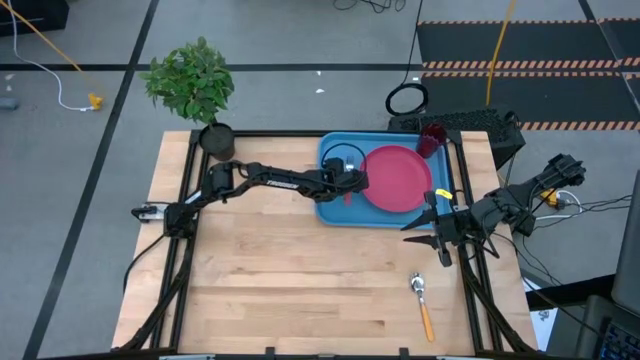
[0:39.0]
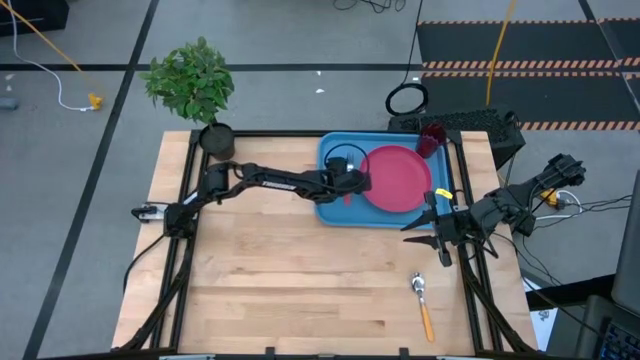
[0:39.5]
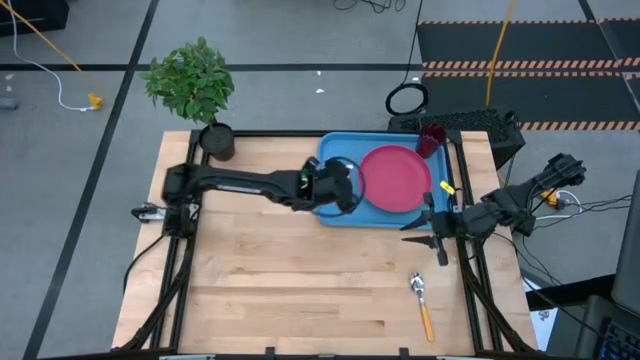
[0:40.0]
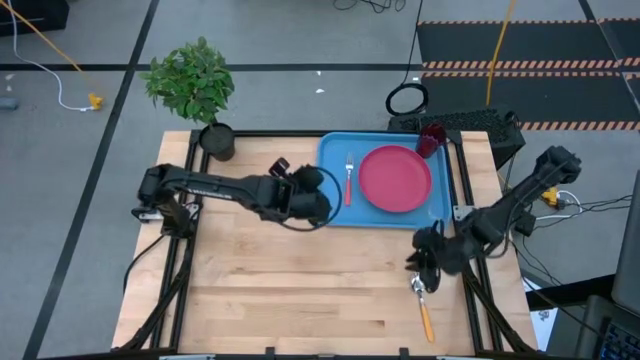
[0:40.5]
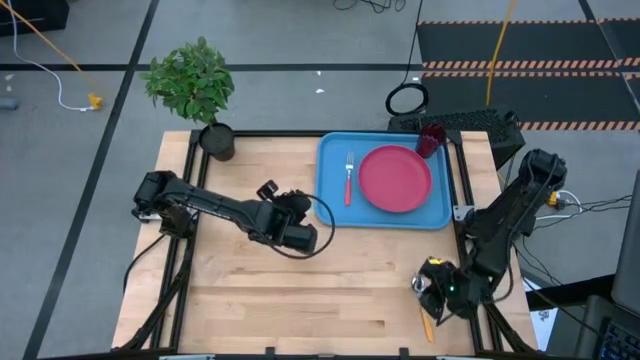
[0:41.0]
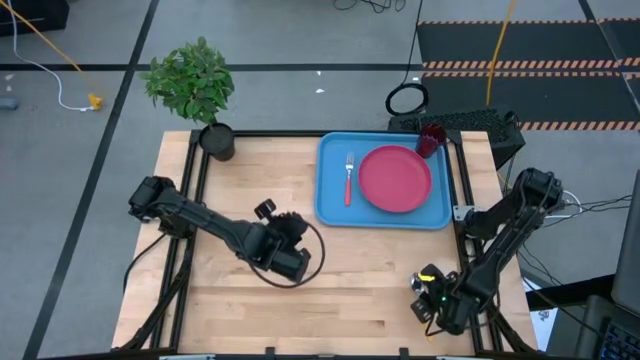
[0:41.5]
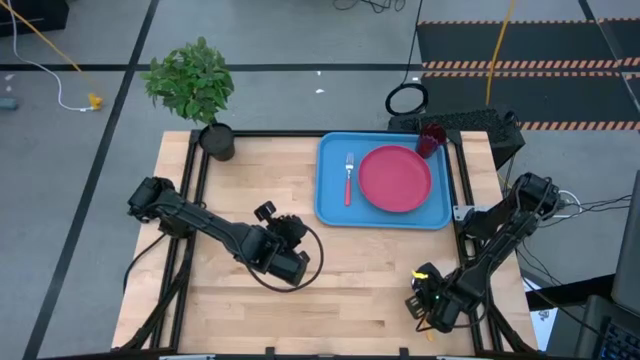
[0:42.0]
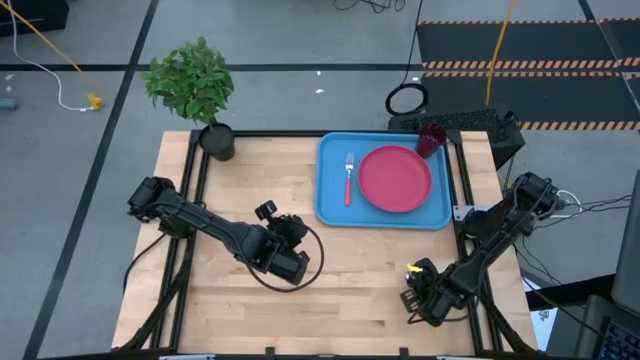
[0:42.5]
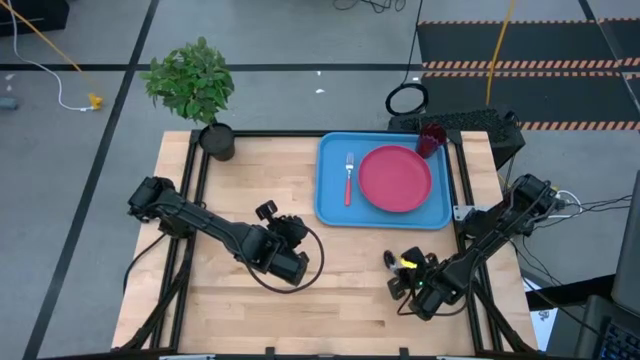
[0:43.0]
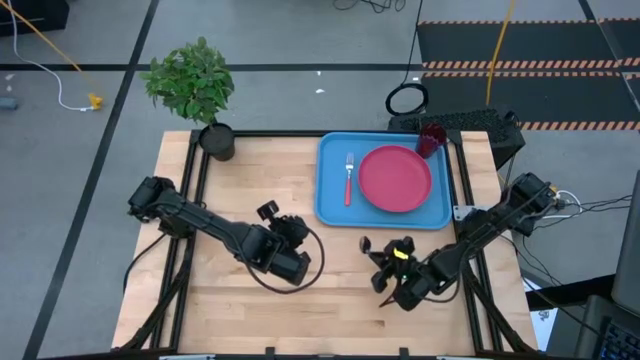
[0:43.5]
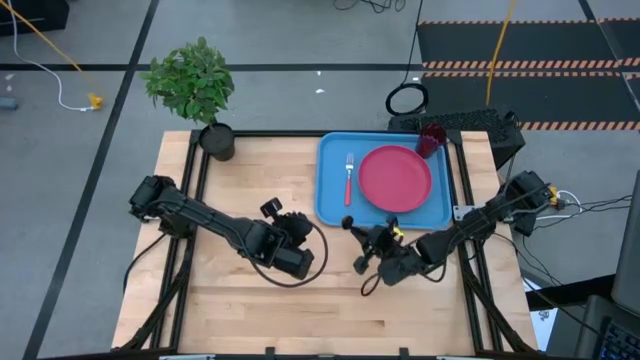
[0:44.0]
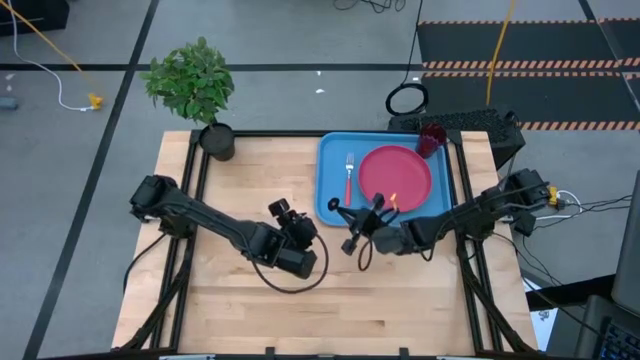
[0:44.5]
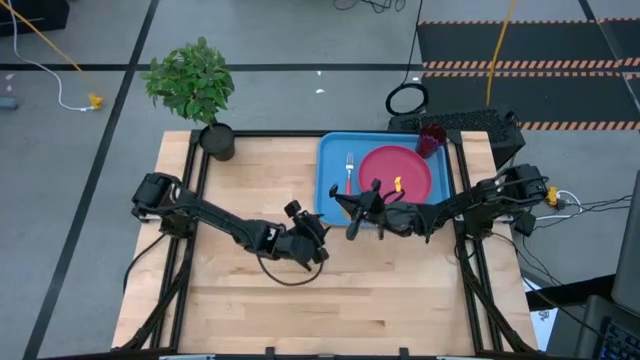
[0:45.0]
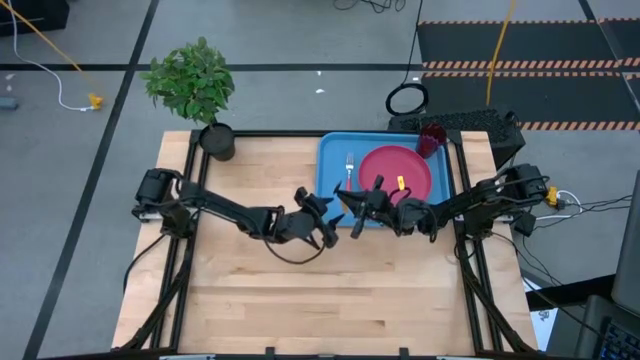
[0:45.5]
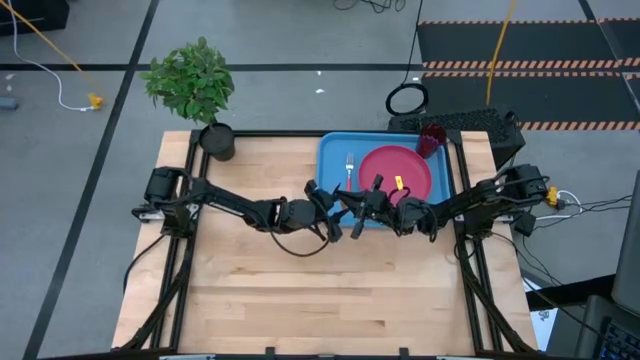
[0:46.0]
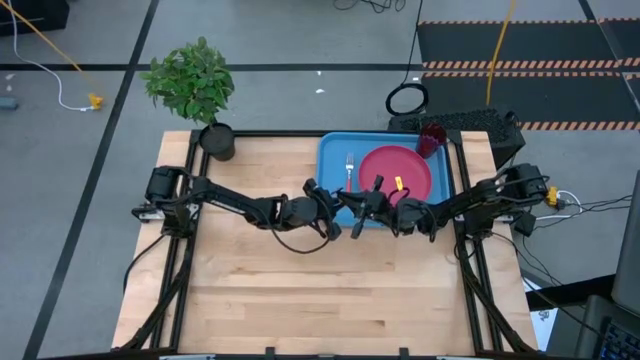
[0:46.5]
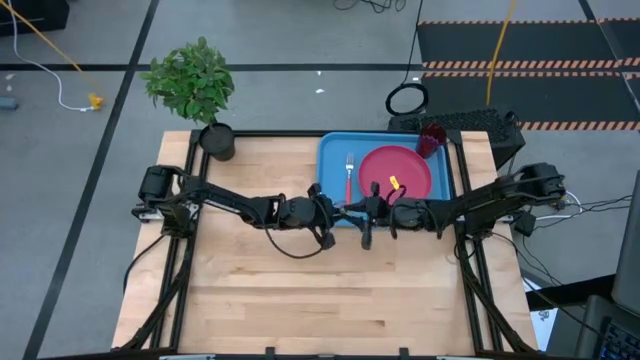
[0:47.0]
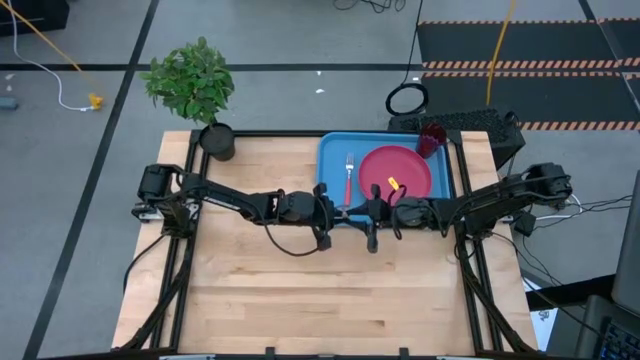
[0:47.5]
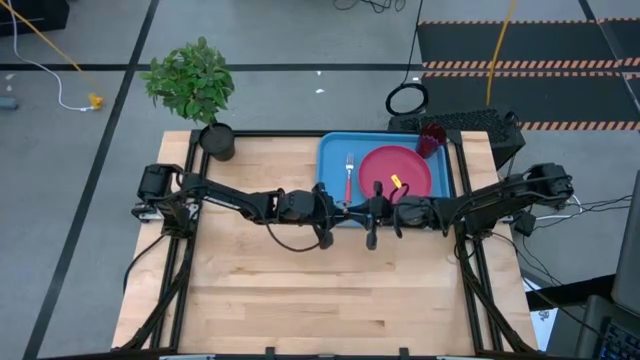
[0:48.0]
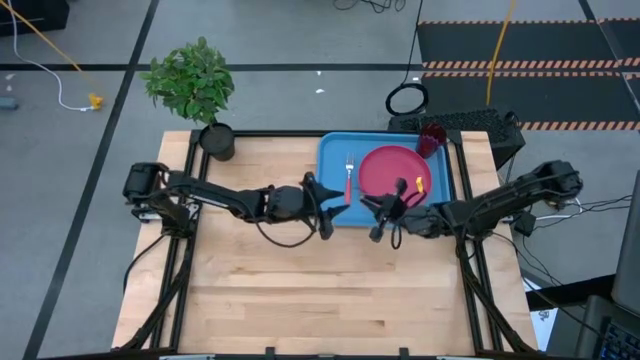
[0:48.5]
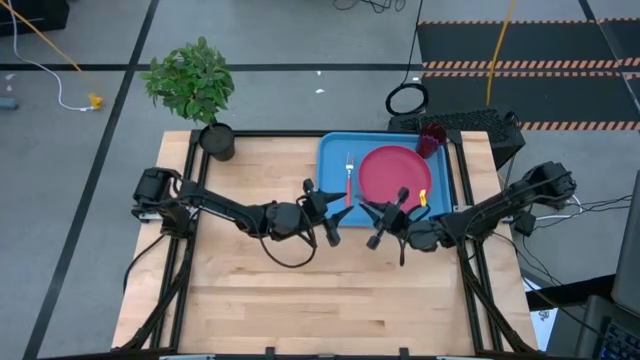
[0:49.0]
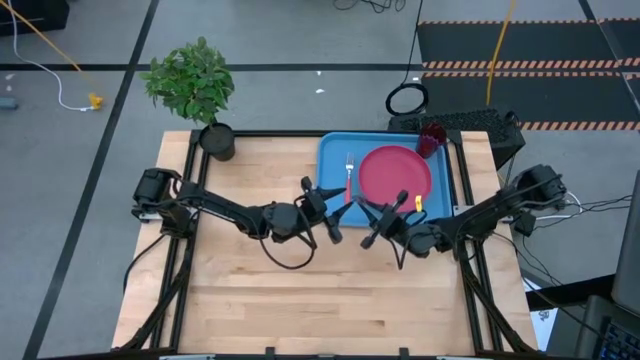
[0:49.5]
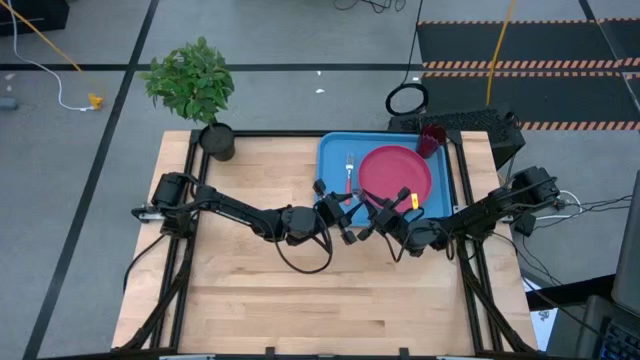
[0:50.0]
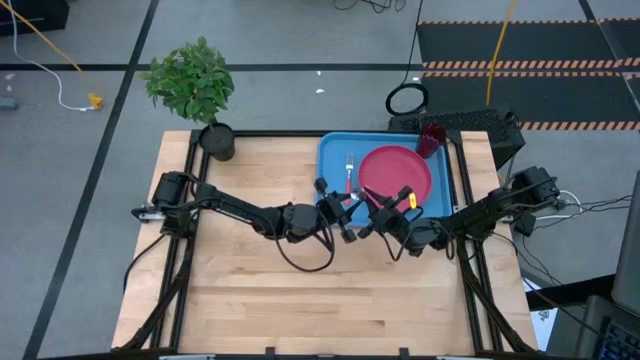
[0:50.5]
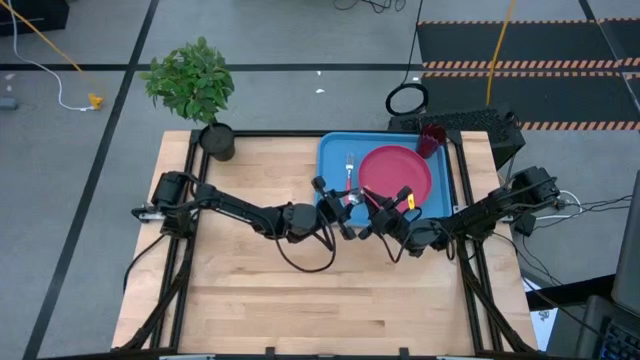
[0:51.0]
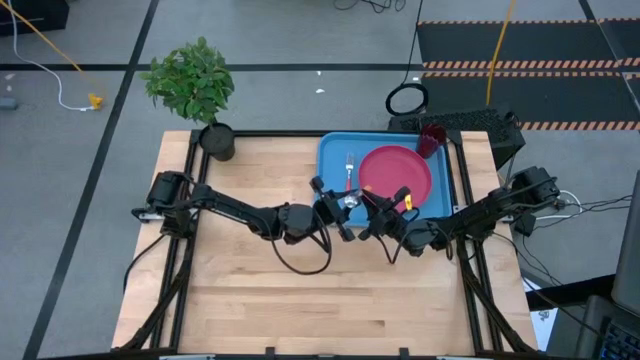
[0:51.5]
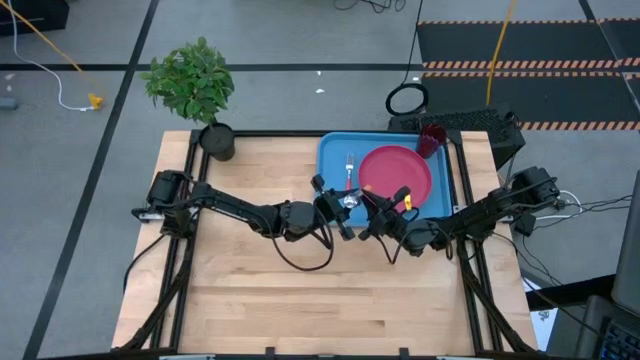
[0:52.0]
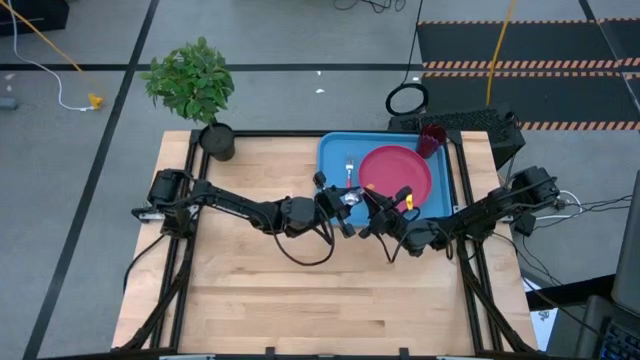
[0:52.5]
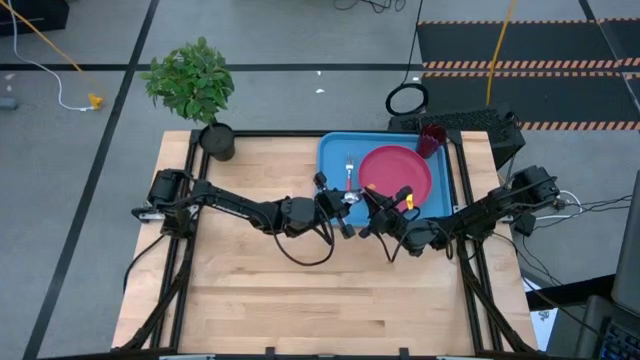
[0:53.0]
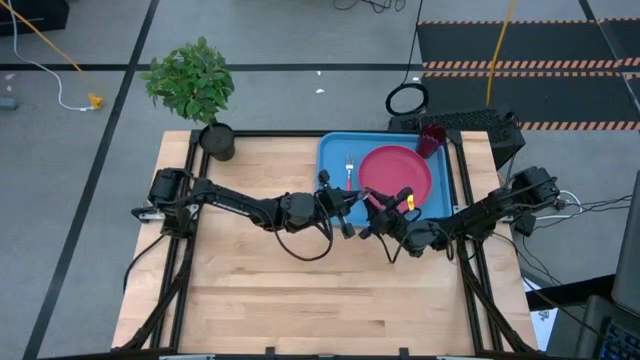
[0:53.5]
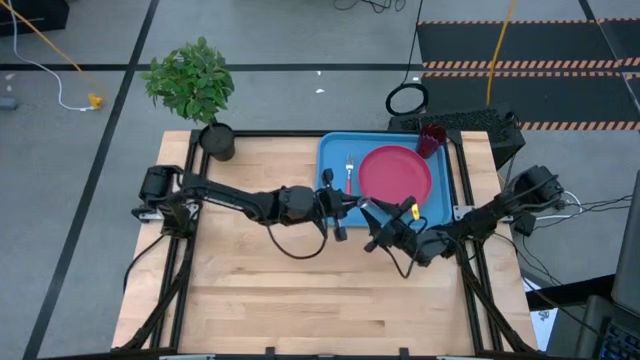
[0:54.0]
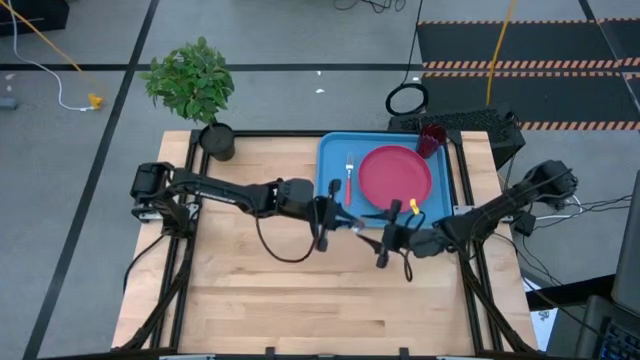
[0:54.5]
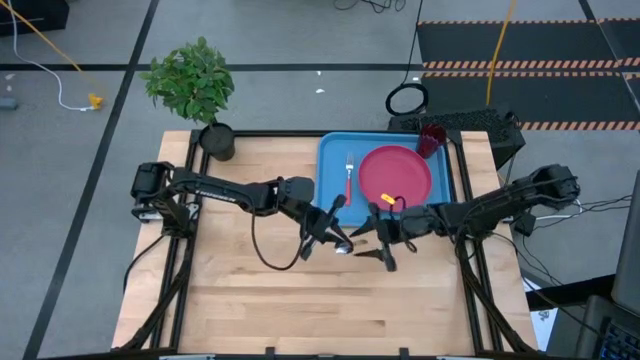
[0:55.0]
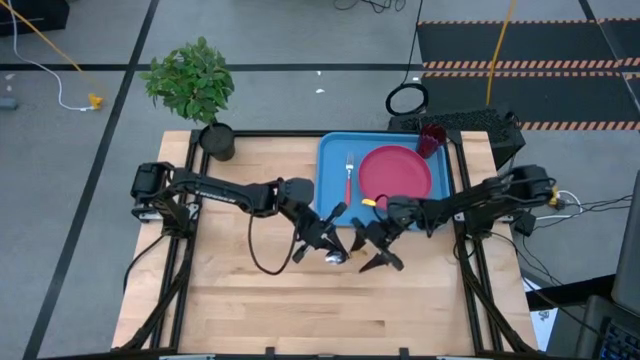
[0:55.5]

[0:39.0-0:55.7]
Task: Pick and place plate/cup/fork/spoon on tray
Put the yellow spoon on the blue tray to the left of the pink fork
